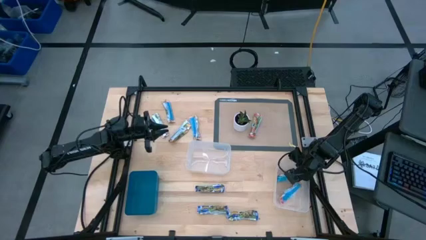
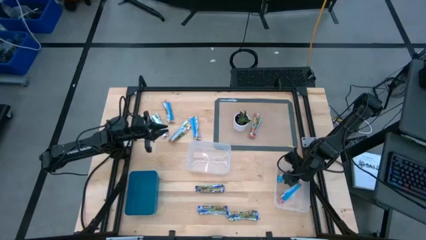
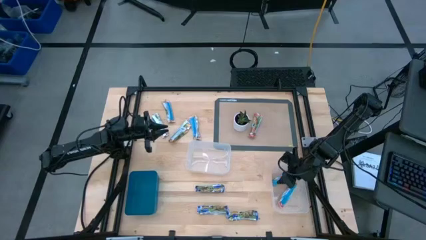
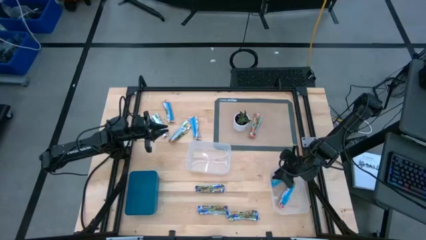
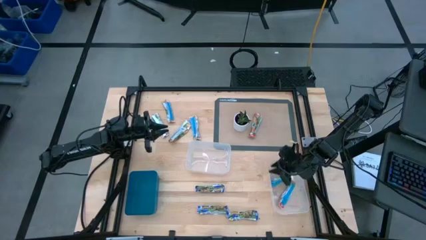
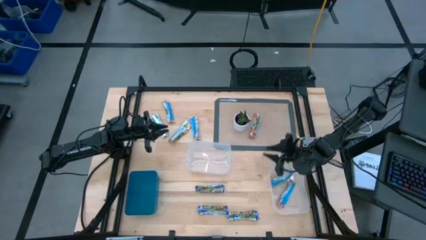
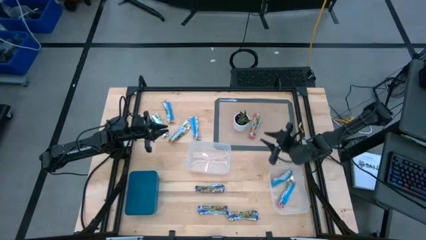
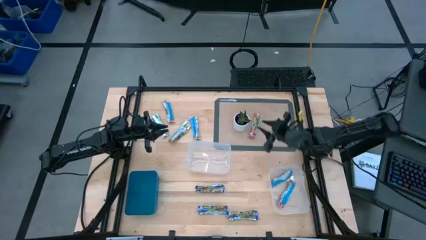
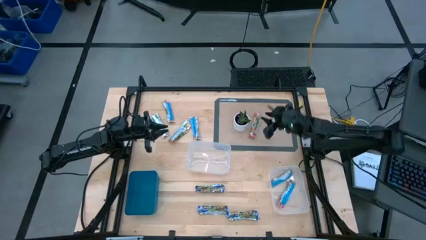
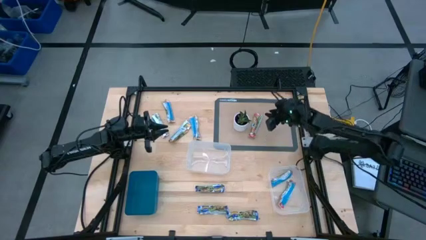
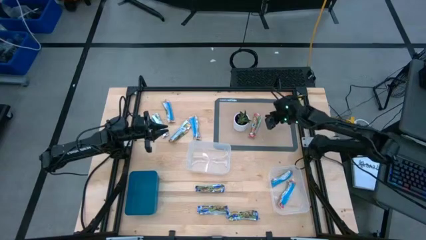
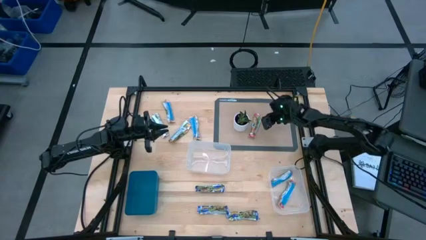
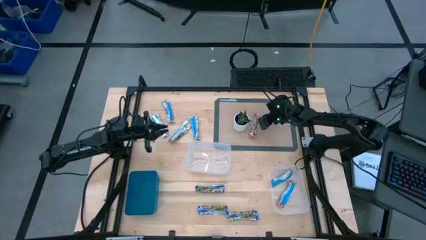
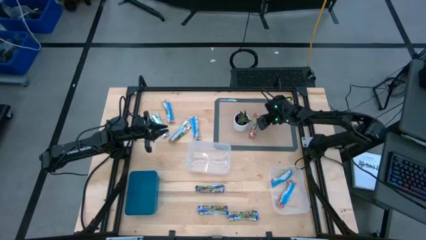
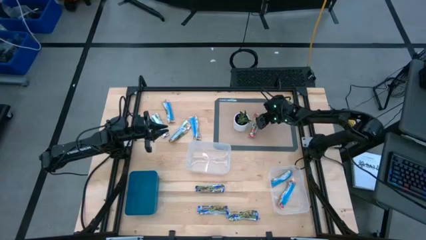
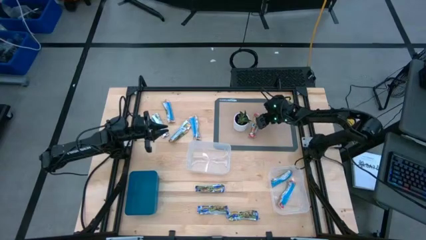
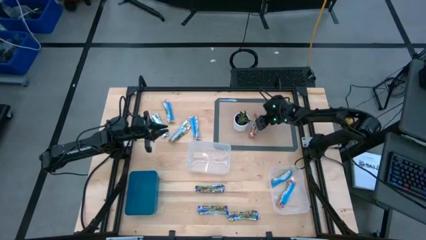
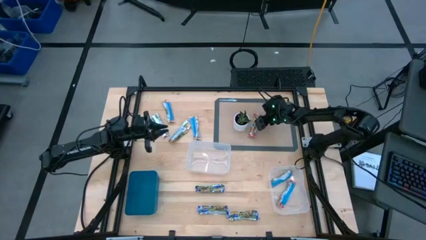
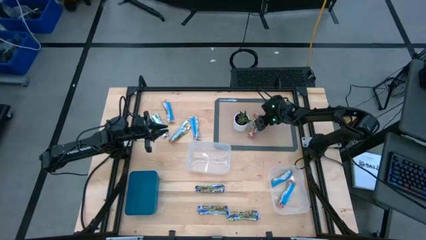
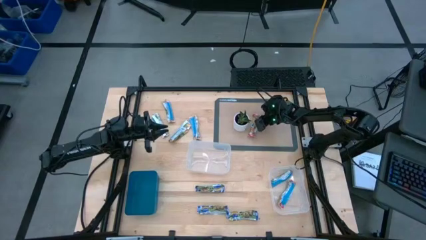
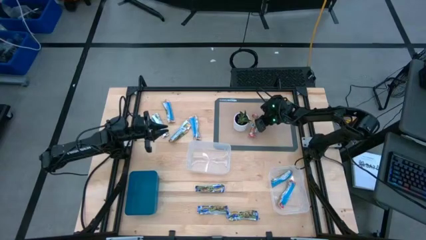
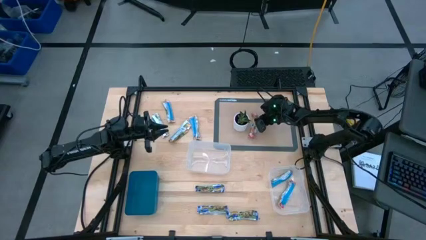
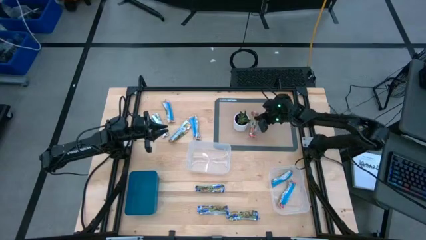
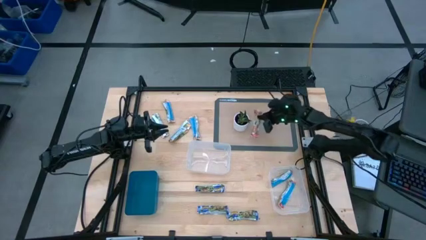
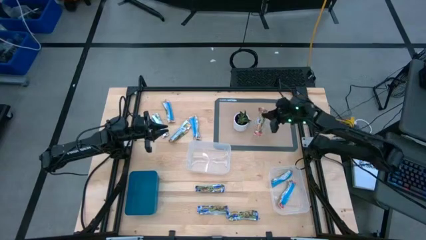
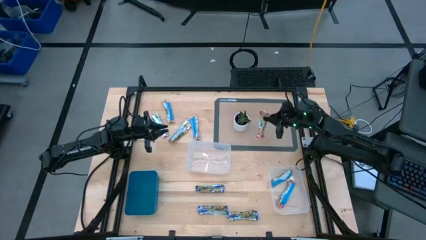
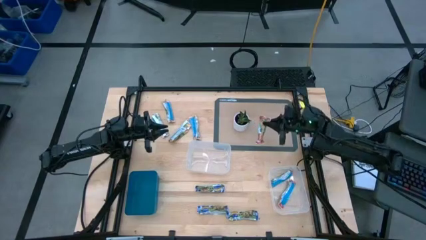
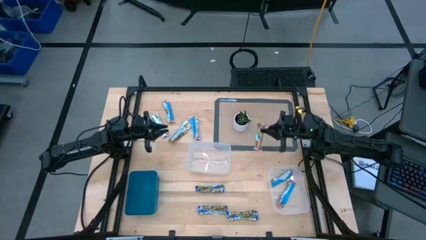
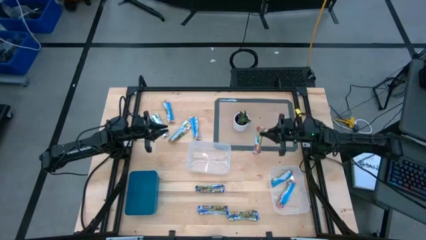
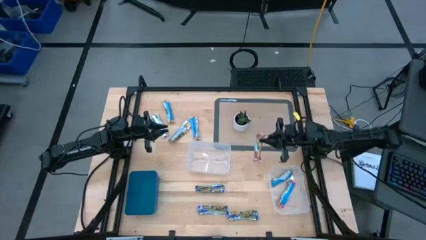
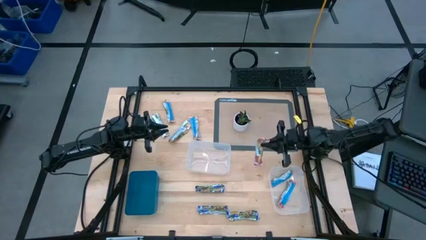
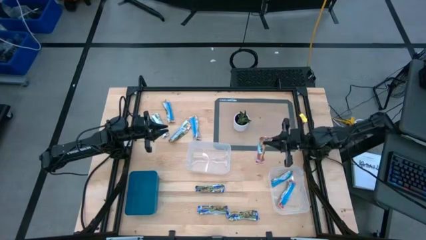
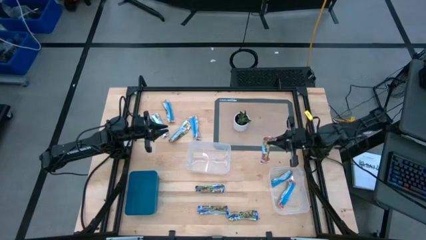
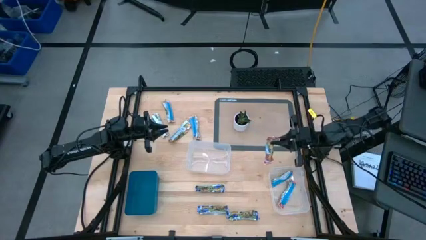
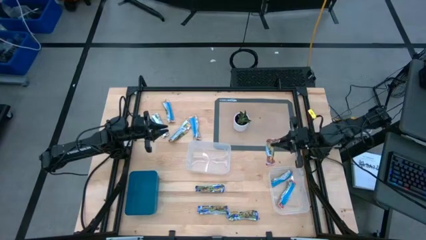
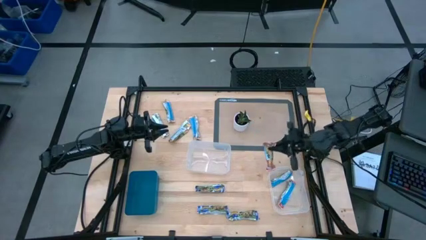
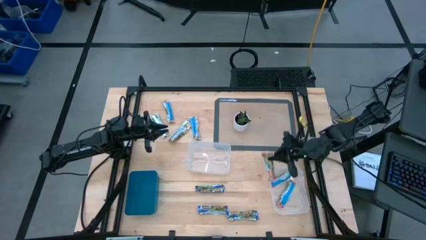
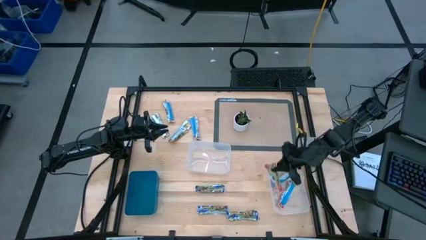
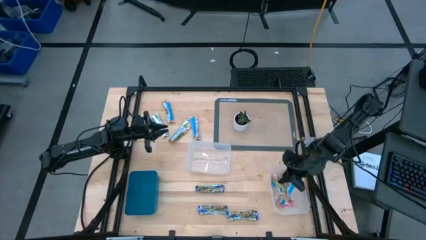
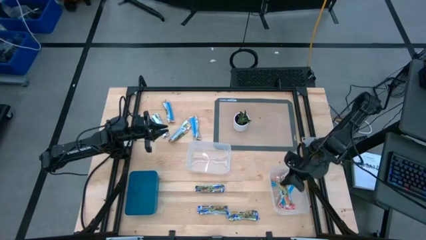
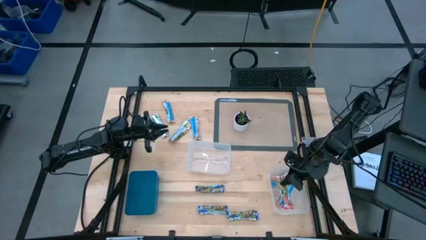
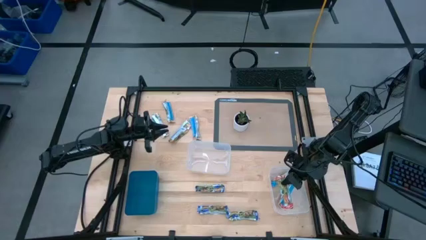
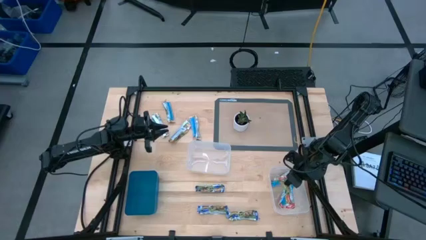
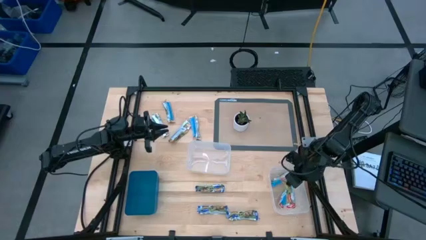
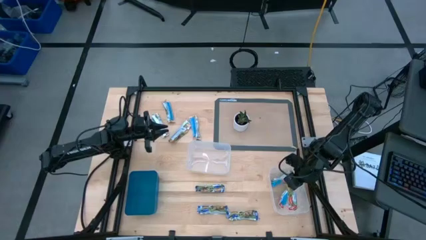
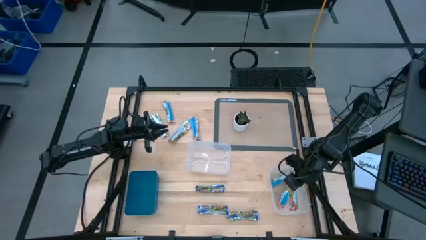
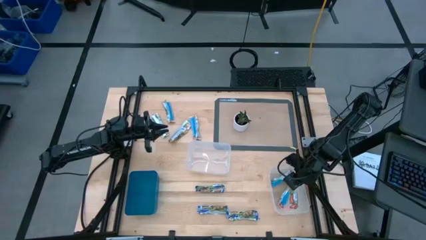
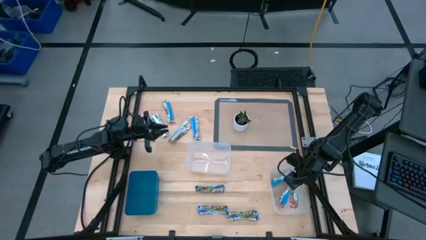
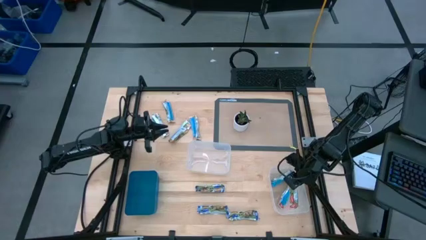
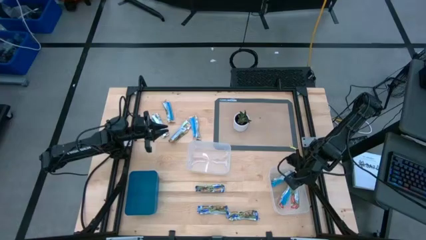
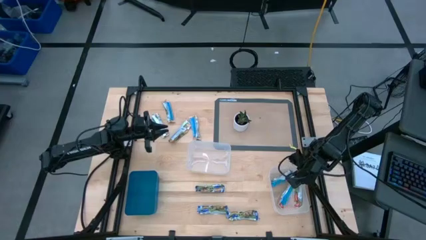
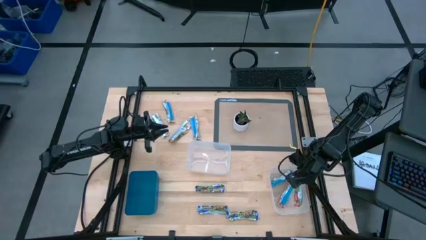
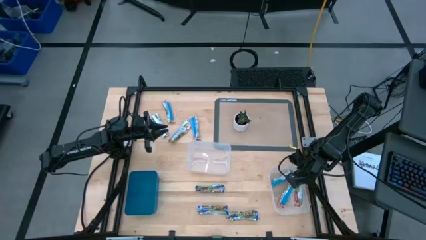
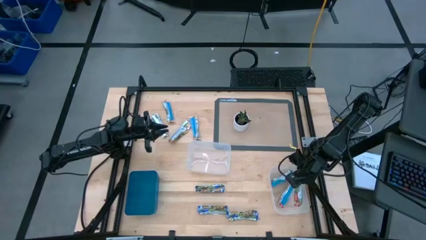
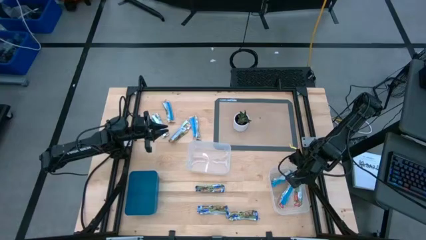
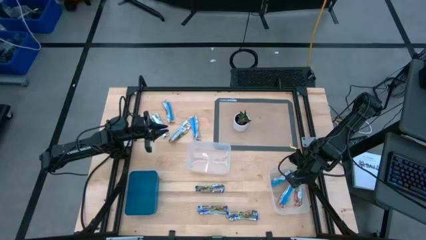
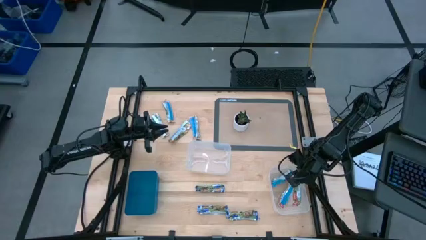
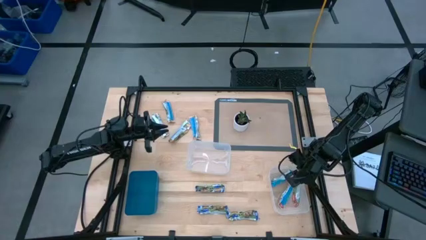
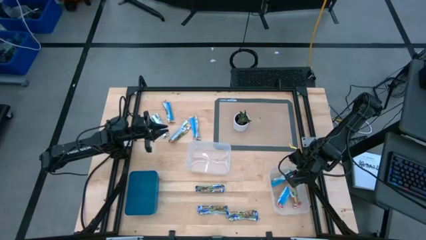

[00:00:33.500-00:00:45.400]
Task: Pick and place Granola Bars by type
Put the red granola bar into the right transparent bin
